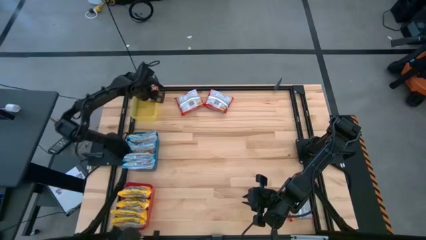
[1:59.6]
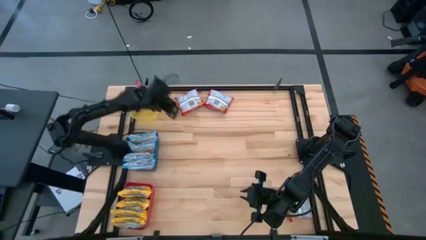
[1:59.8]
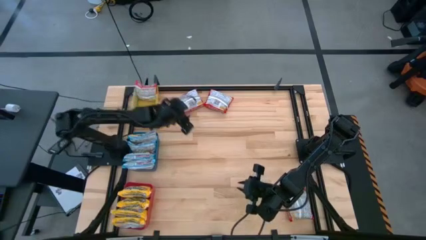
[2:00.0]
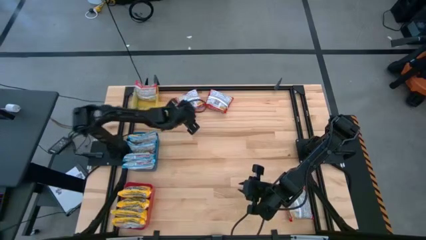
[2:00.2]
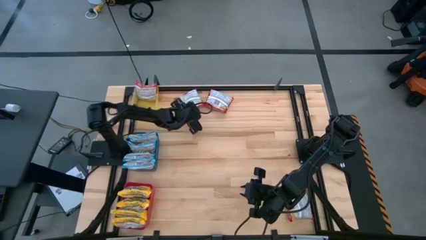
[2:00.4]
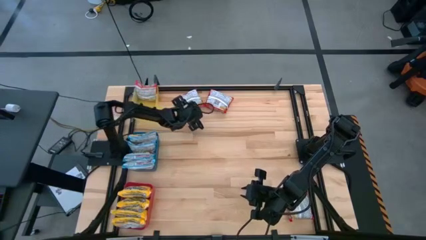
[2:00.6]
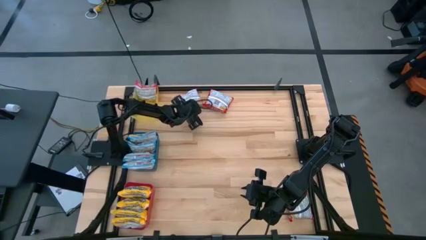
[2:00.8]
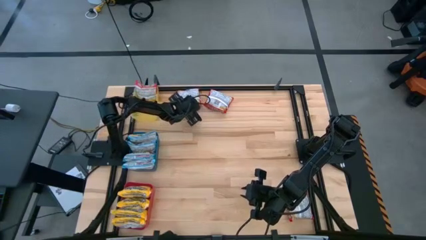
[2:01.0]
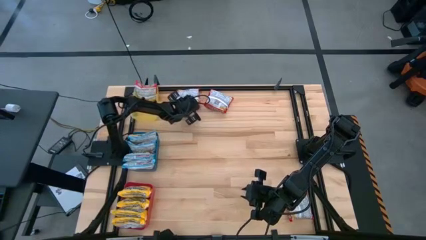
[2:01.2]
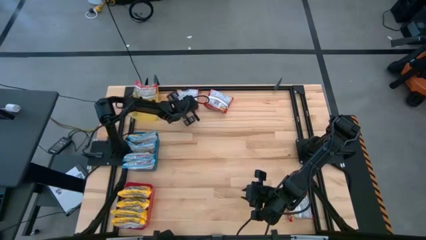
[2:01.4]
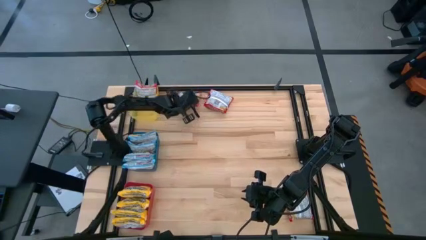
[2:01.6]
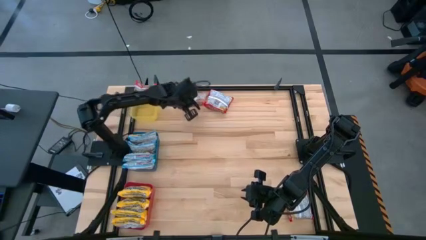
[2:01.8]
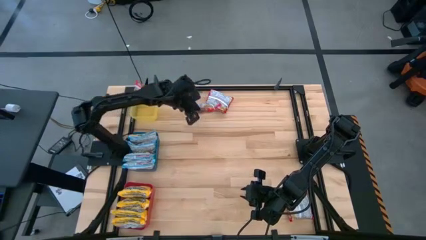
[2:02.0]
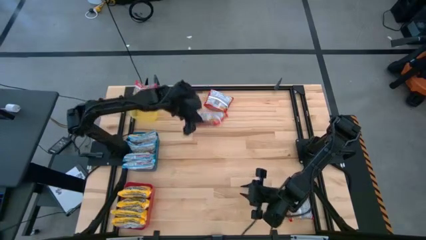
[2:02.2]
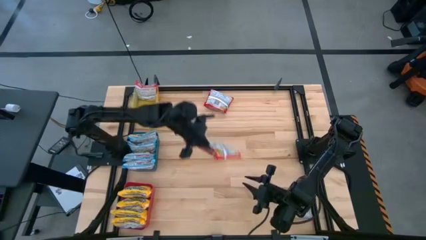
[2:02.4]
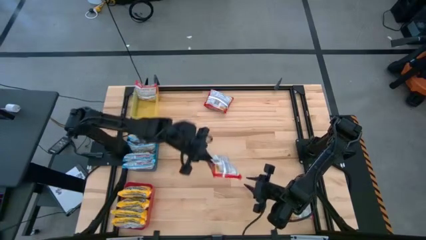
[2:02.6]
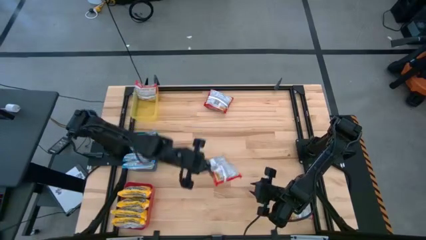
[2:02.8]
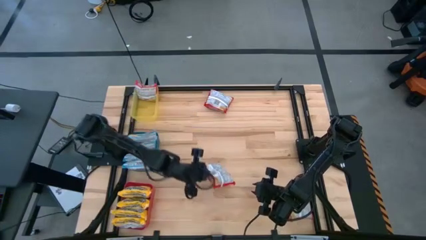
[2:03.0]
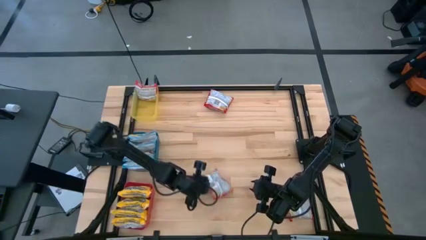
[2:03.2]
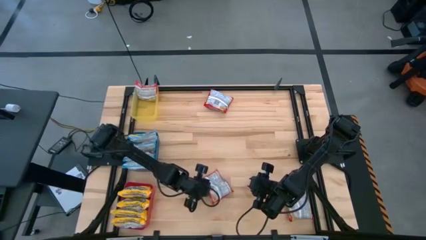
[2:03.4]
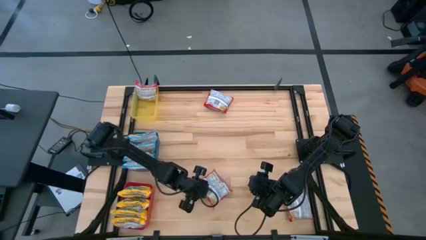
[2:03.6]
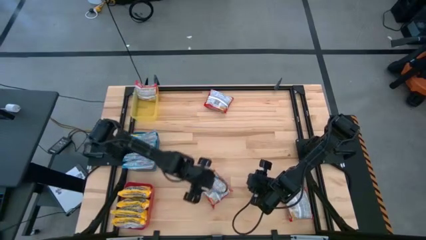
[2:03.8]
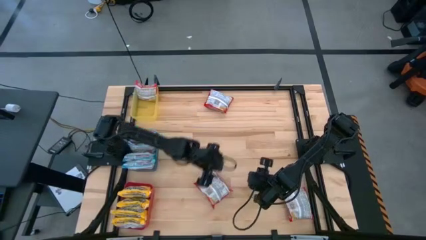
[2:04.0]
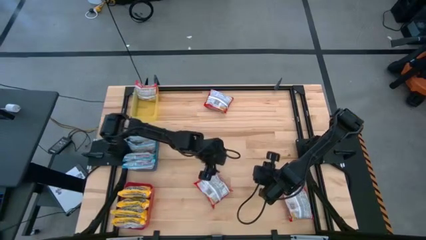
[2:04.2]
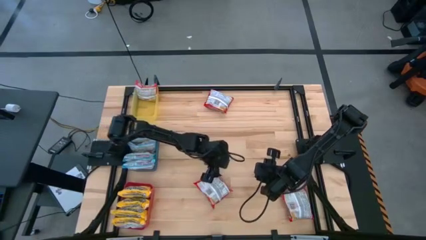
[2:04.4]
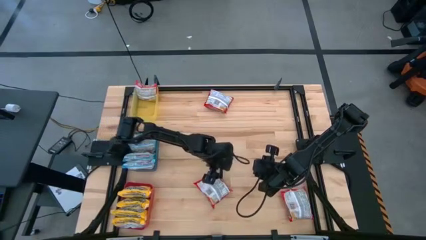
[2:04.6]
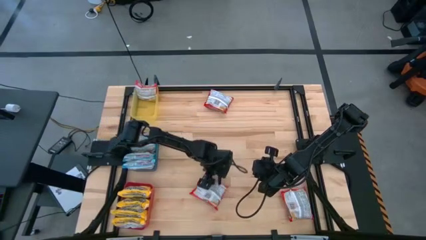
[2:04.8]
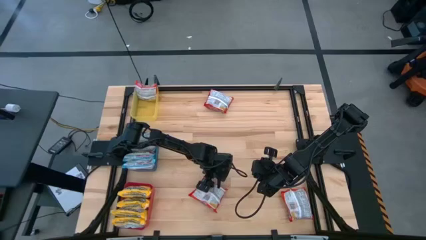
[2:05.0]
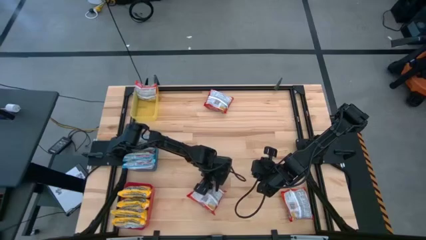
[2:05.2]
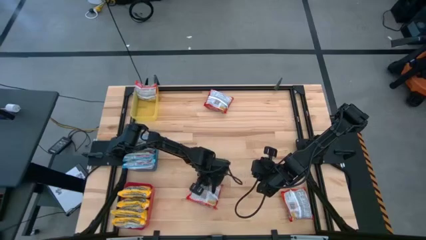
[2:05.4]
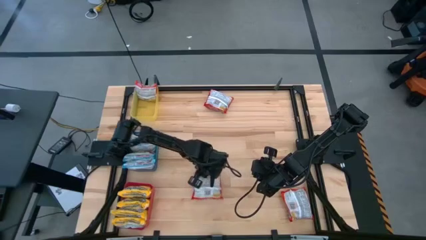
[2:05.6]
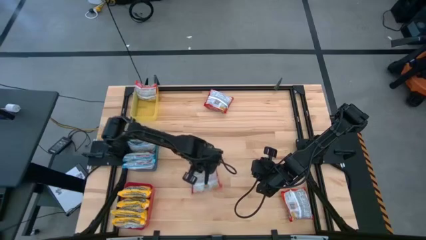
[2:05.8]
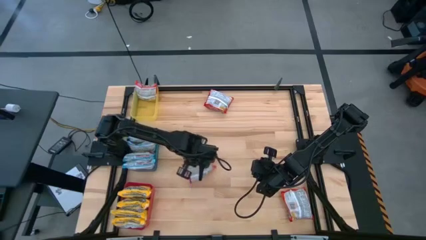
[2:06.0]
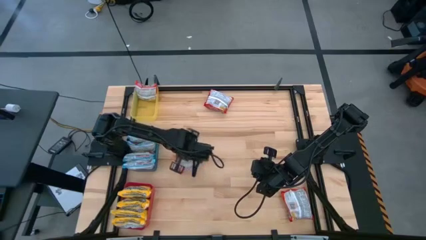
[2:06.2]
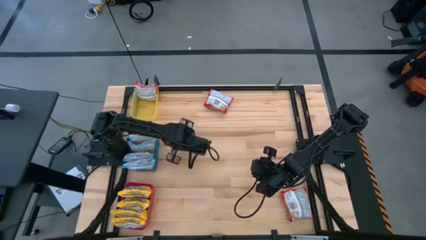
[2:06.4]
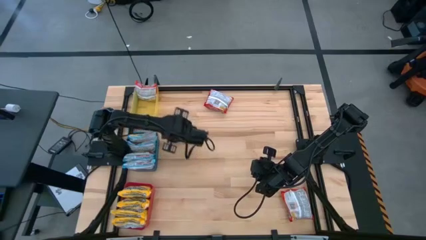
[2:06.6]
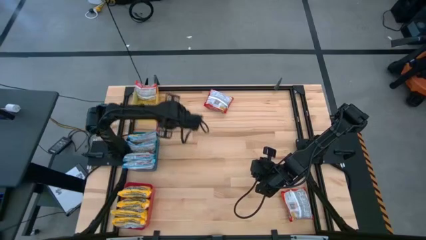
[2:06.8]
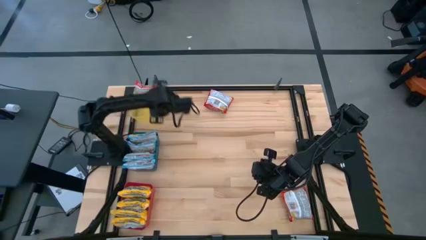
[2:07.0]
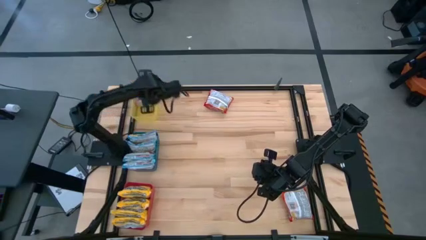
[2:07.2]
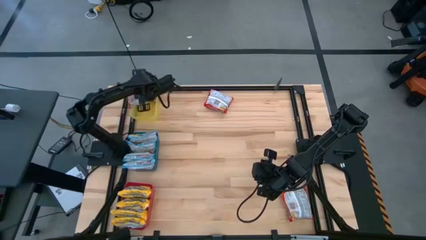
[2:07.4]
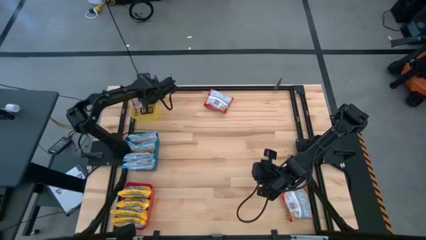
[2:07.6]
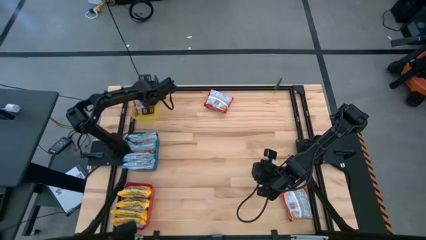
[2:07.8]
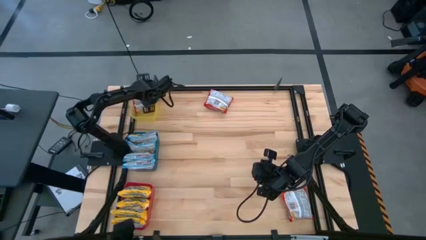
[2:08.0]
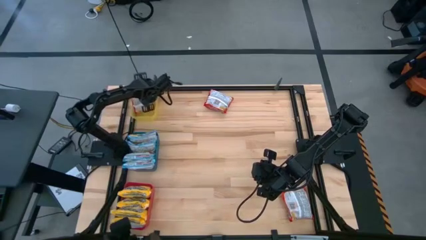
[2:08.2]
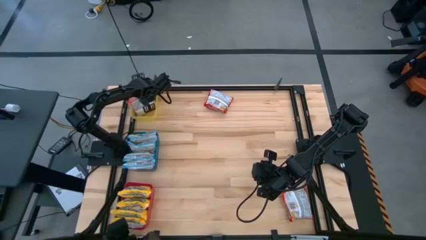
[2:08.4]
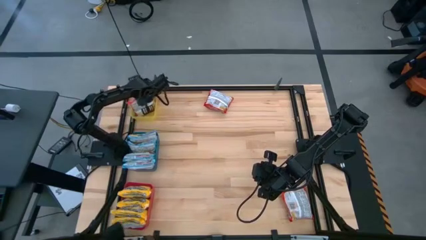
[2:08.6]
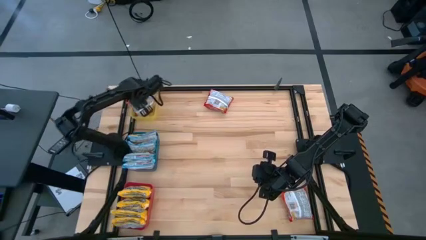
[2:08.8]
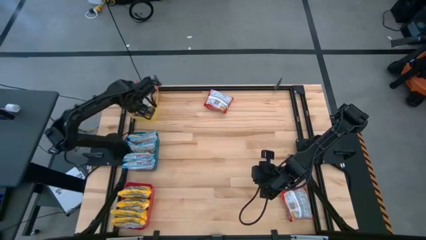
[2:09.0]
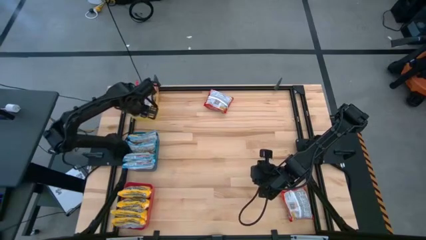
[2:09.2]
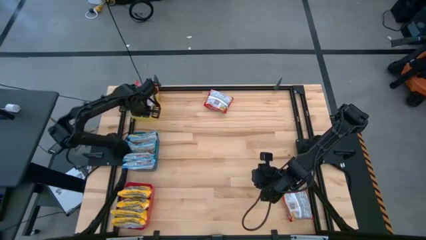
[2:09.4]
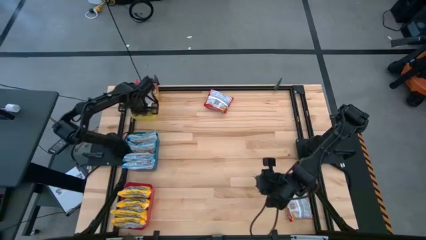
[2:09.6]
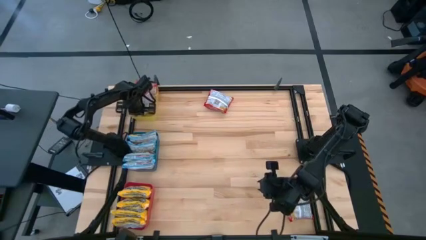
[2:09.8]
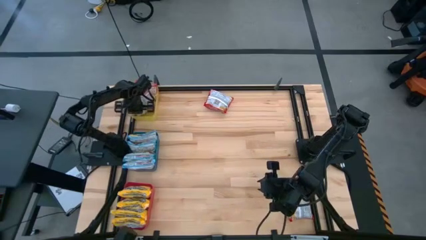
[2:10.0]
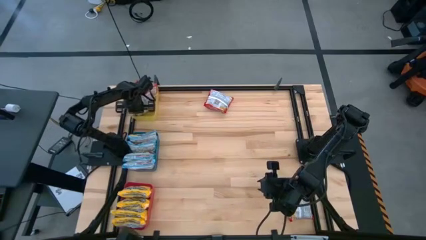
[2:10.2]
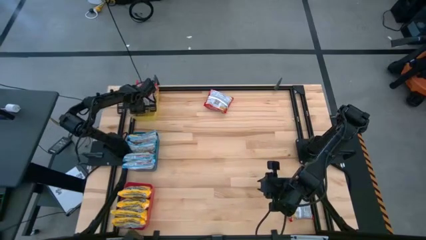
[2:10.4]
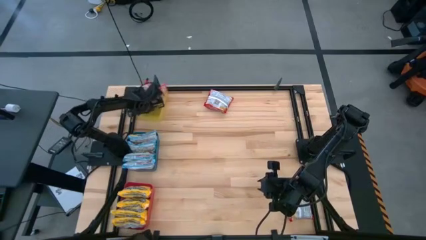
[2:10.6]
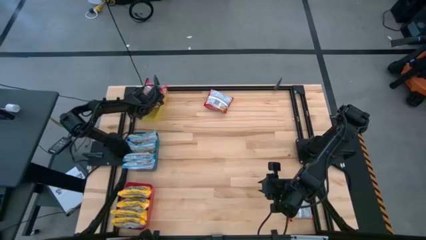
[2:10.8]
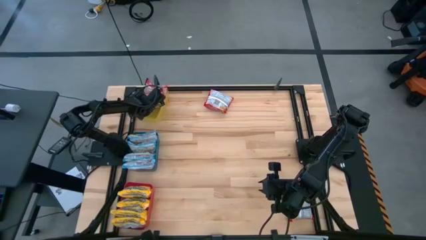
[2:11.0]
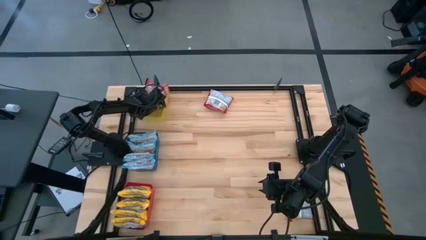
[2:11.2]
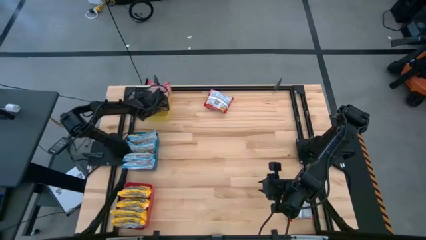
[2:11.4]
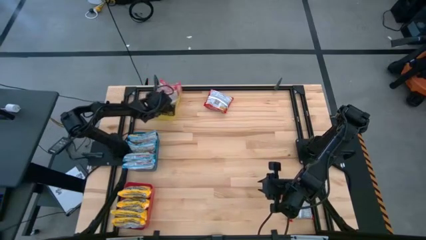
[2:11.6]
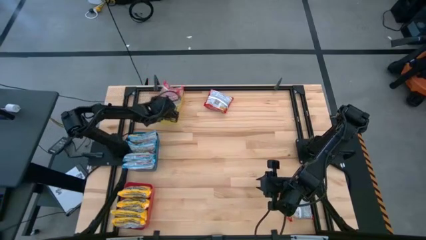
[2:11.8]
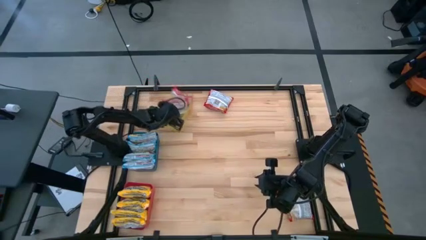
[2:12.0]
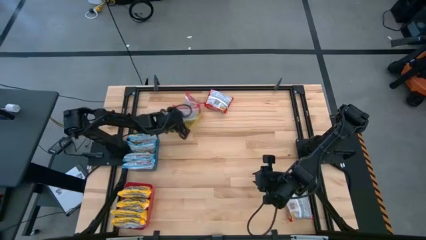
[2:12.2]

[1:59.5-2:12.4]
Task: Sort Maruchan noodles
Put the top left red noodle pack into the yellow bin

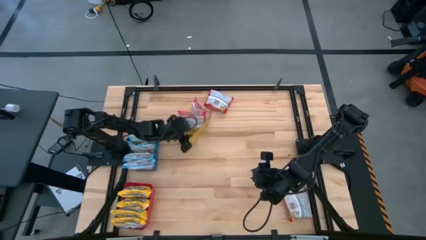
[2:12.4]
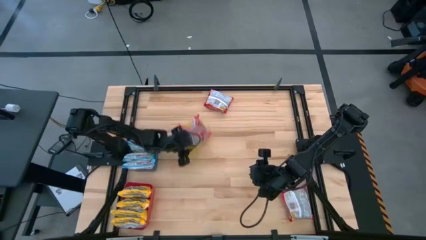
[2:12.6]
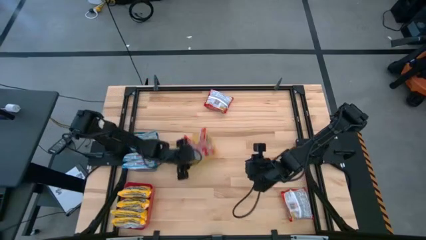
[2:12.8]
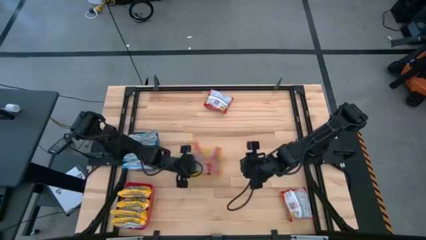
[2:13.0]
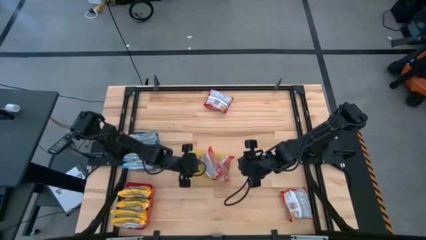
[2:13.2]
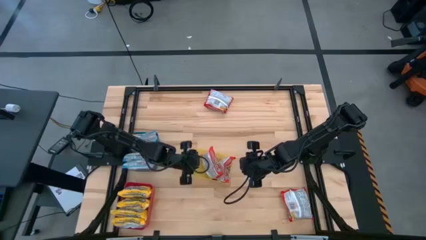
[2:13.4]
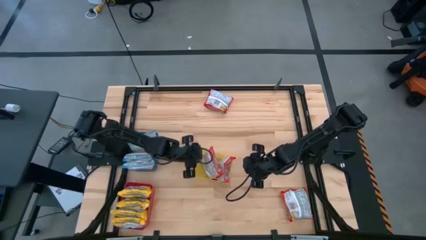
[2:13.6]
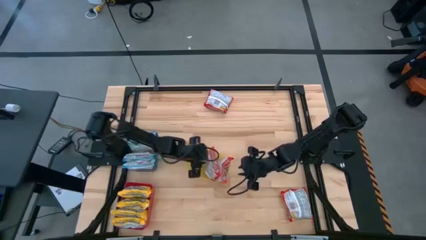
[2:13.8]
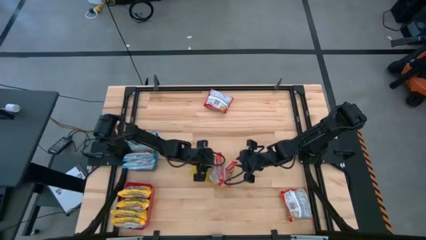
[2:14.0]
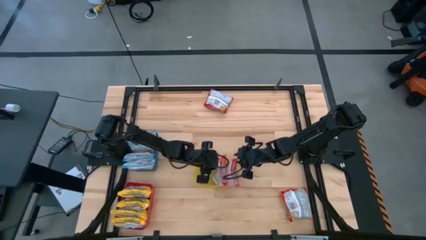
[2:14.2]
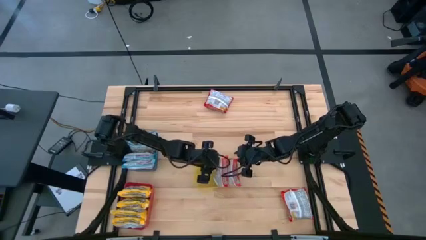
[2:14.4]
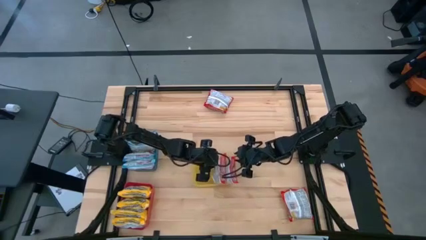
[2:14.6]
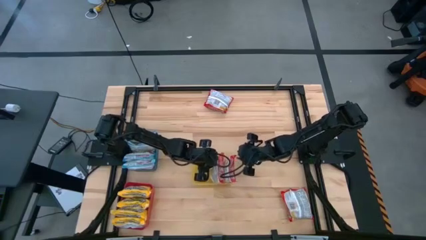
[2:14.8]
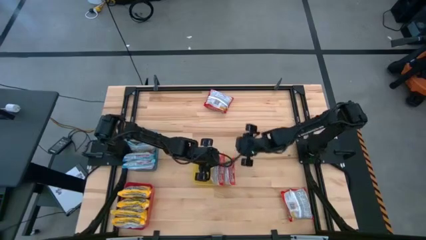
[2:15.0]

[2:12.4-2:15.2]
Move the yellow bin to the center

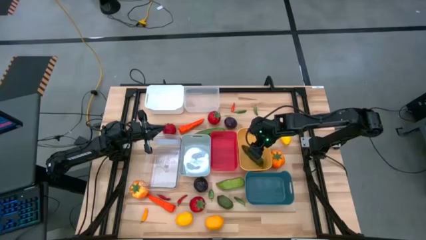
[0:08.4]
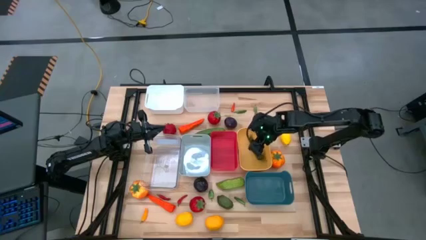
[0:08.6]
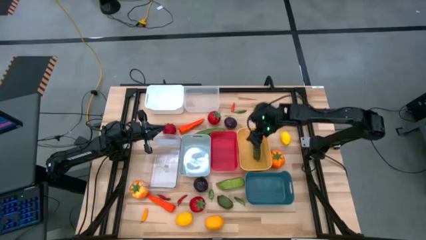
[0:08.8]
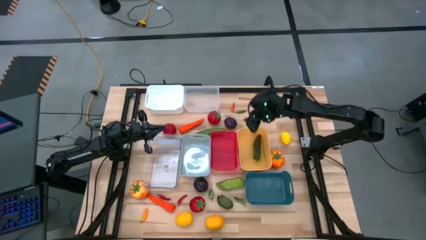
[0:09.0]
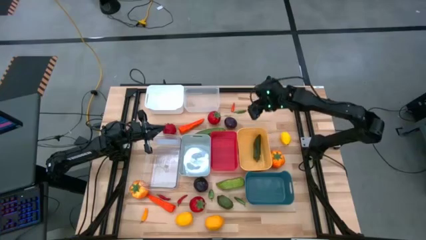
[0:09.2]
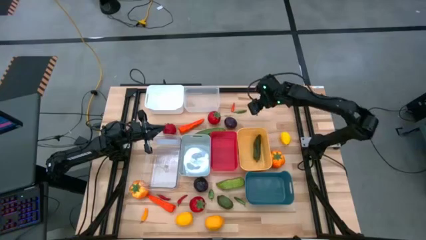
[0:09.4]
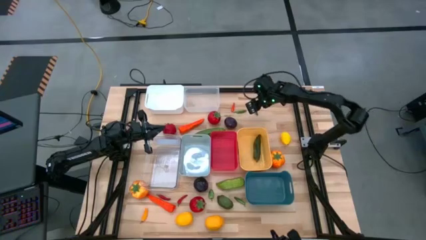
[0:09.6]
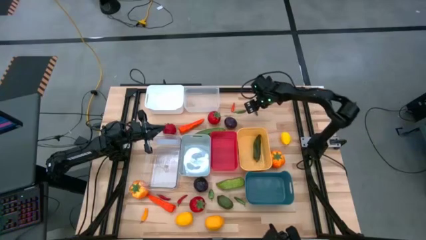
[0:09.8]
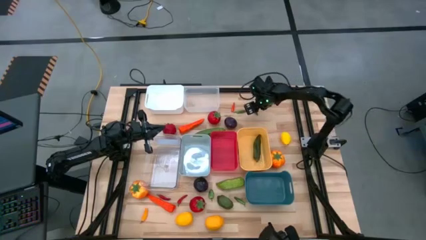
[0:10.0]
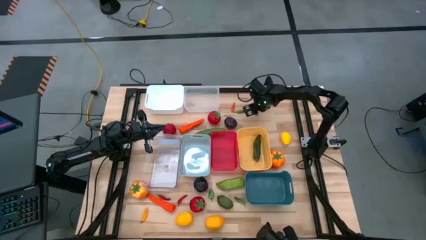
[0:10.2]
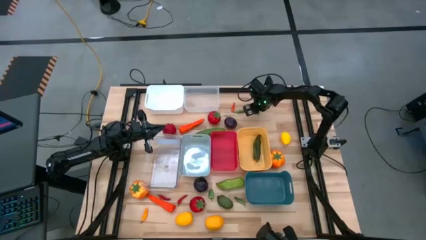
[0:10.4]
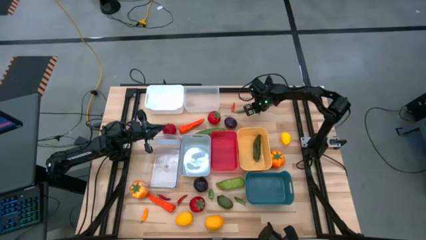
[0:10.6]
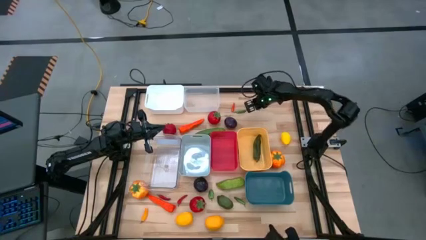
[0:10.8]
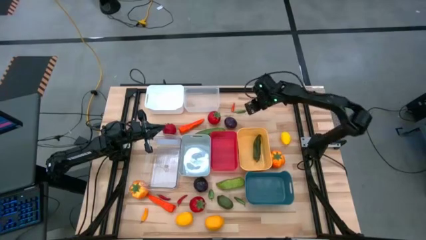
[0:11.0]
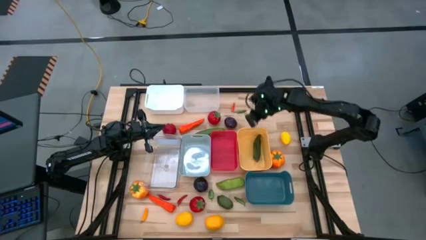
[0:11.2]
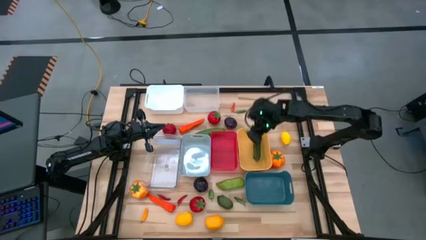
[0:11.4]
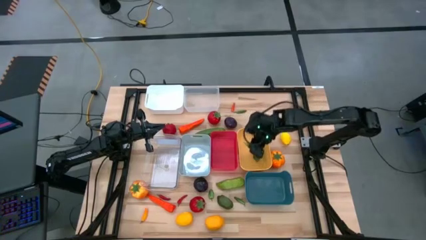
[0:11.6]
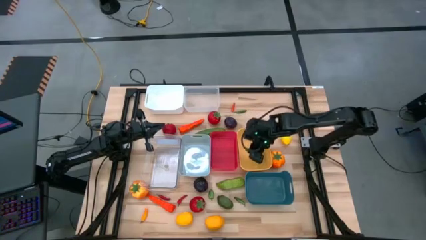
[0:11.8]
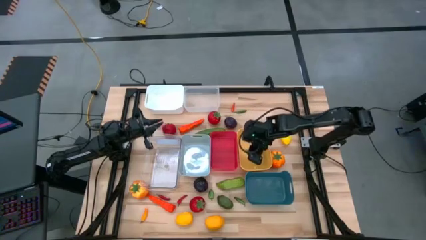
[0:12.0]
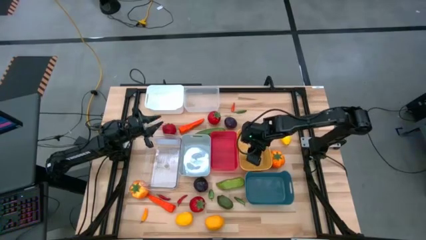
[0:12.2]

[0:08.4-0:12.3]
Task: Sort produce into baskets
Put the green chili pepper into the yellow bin
